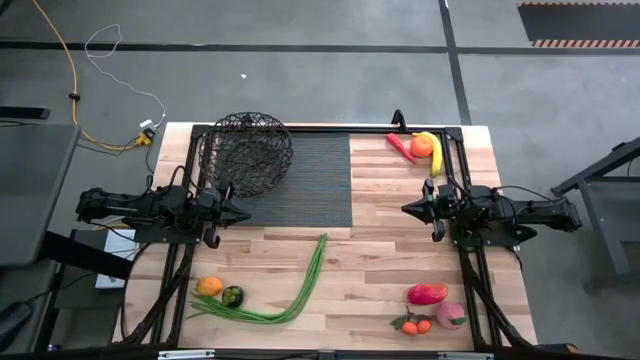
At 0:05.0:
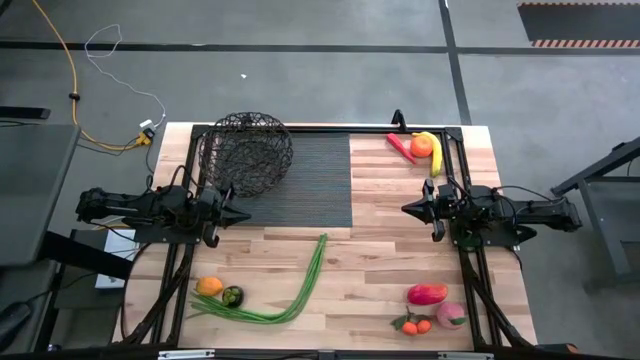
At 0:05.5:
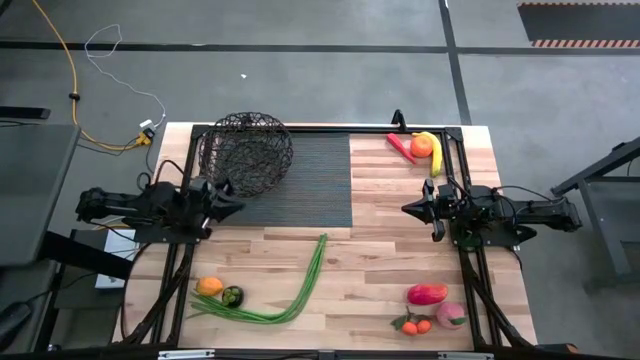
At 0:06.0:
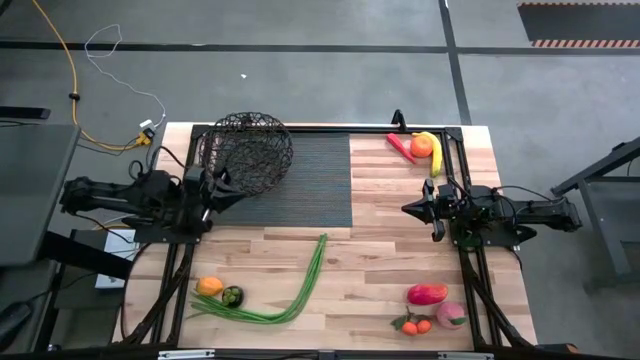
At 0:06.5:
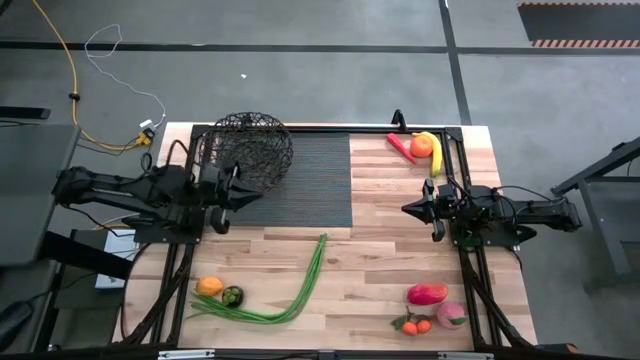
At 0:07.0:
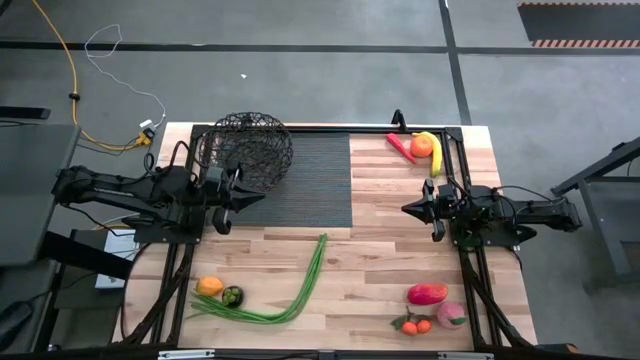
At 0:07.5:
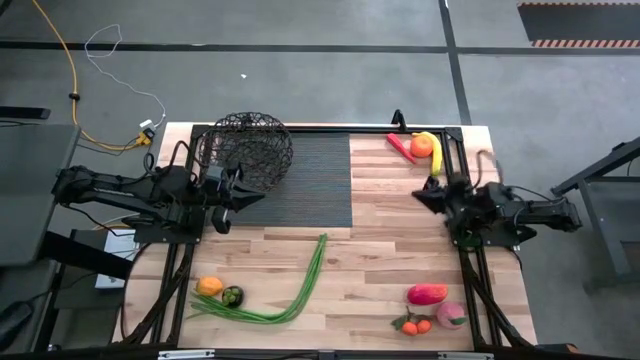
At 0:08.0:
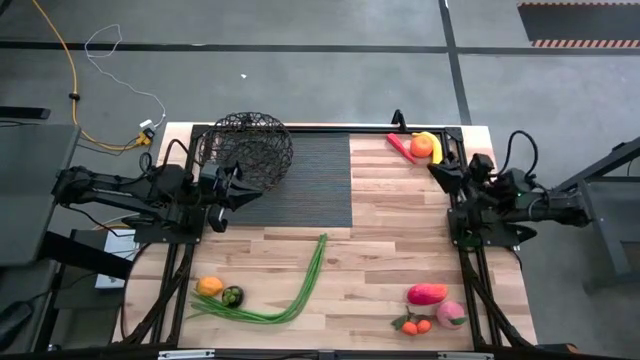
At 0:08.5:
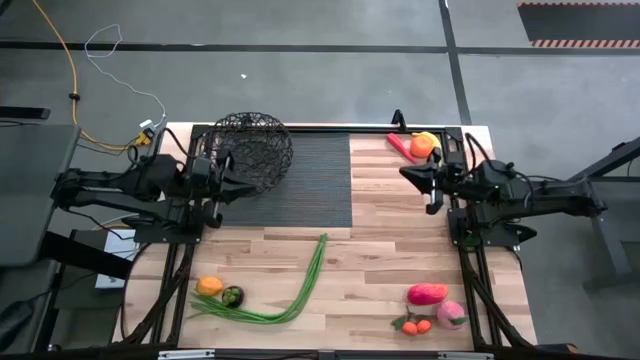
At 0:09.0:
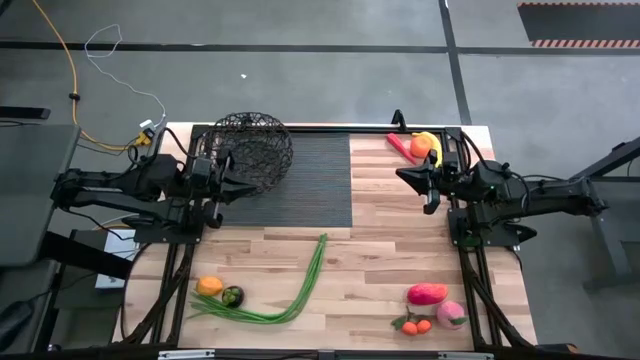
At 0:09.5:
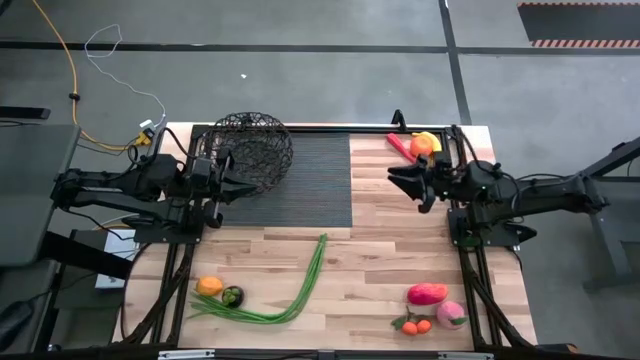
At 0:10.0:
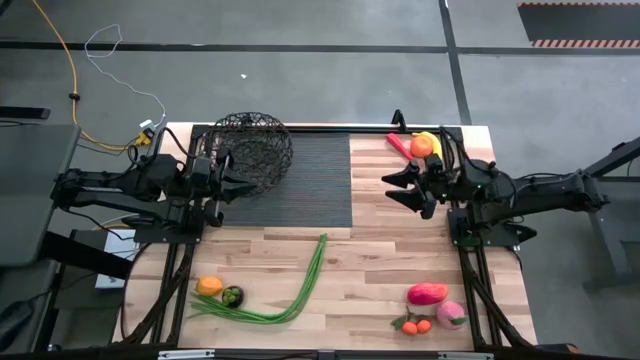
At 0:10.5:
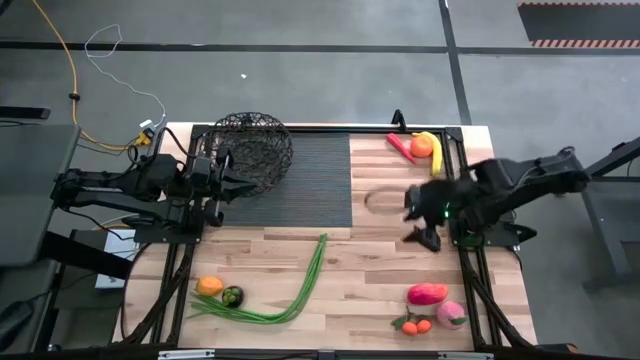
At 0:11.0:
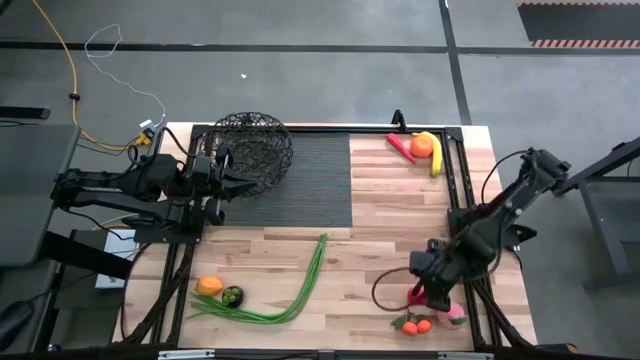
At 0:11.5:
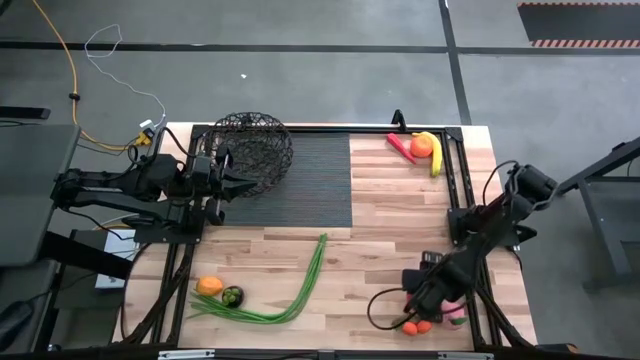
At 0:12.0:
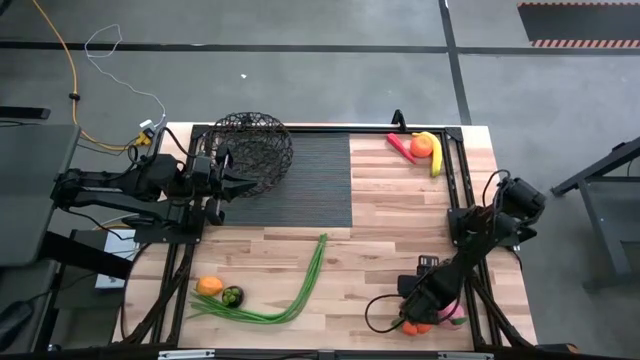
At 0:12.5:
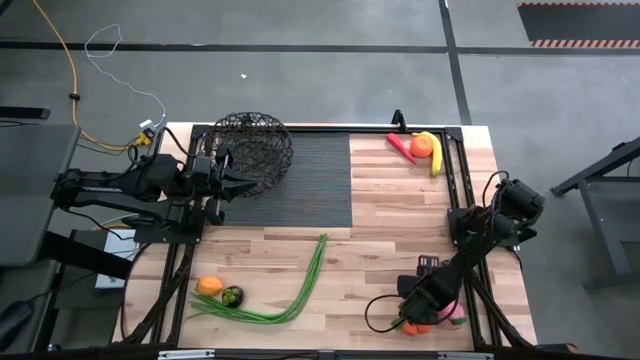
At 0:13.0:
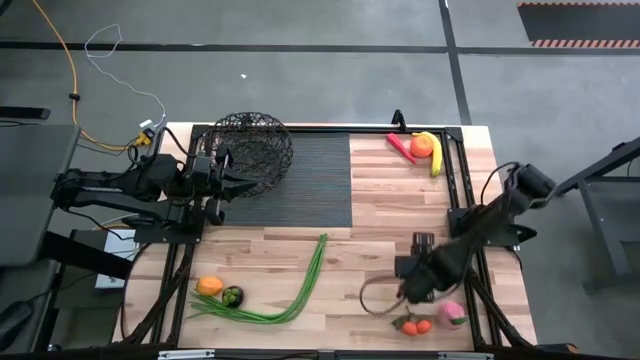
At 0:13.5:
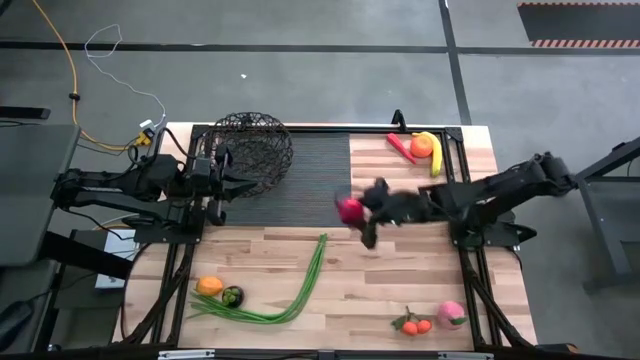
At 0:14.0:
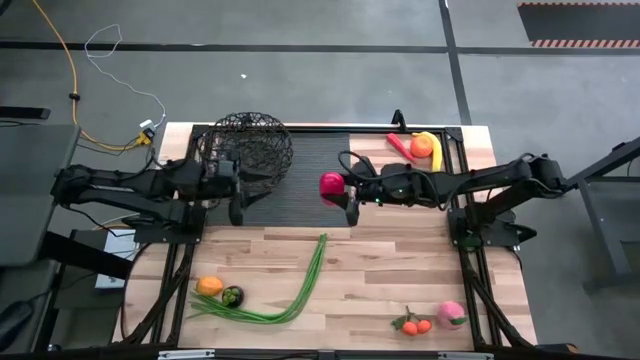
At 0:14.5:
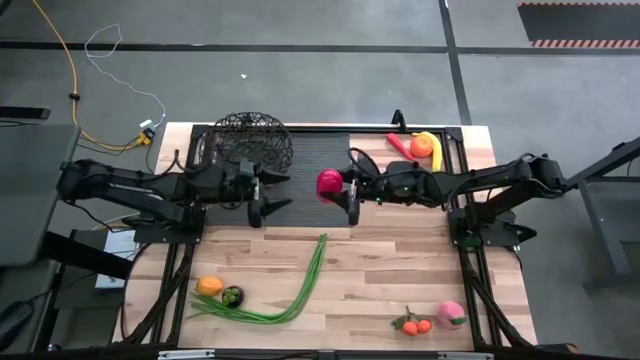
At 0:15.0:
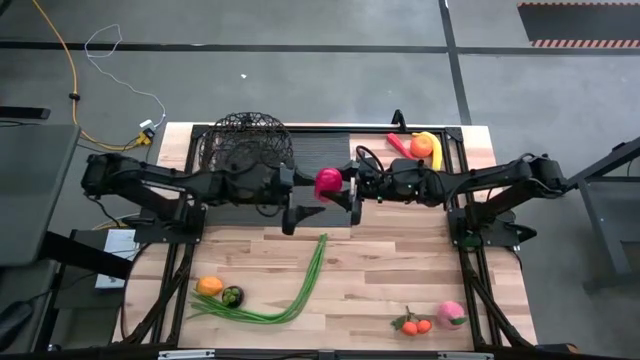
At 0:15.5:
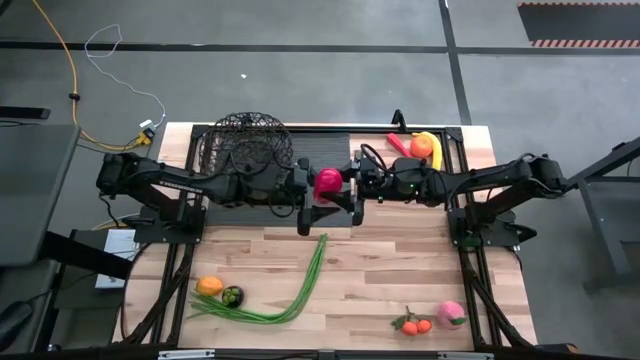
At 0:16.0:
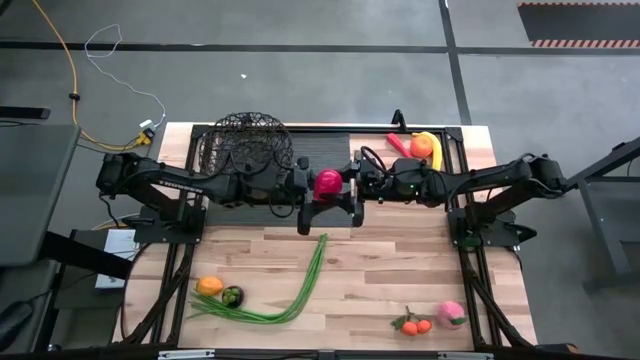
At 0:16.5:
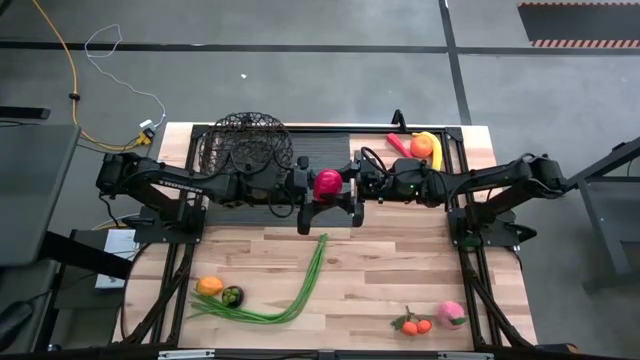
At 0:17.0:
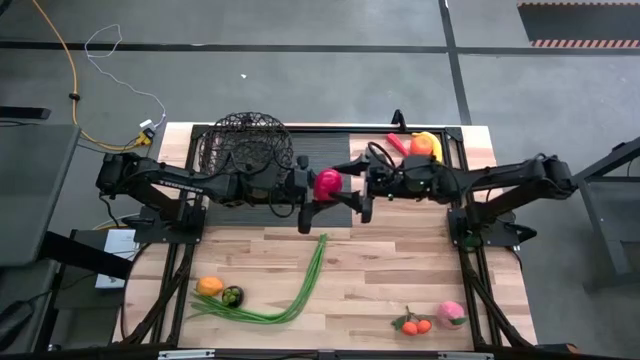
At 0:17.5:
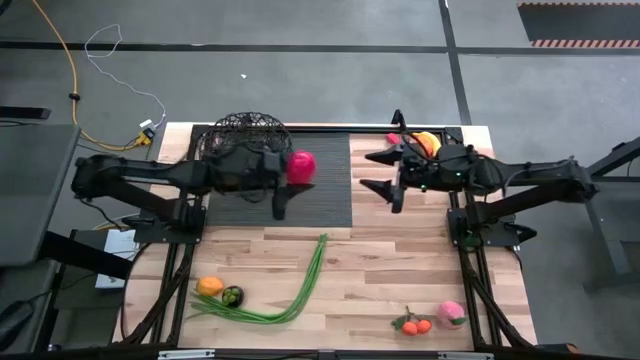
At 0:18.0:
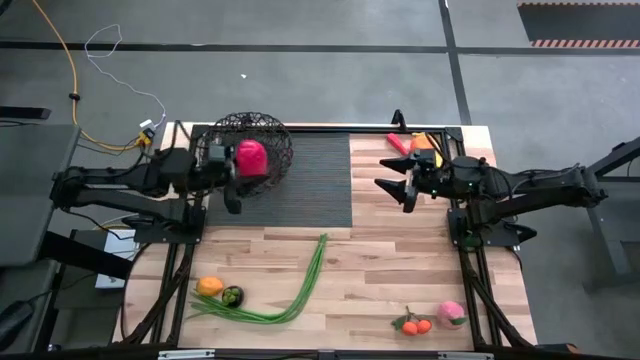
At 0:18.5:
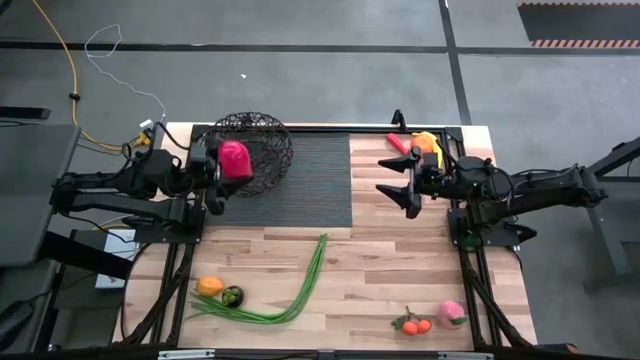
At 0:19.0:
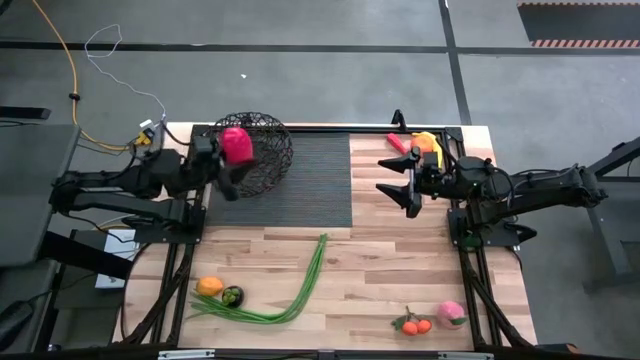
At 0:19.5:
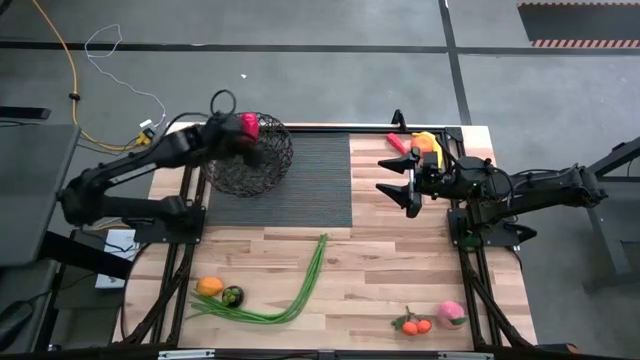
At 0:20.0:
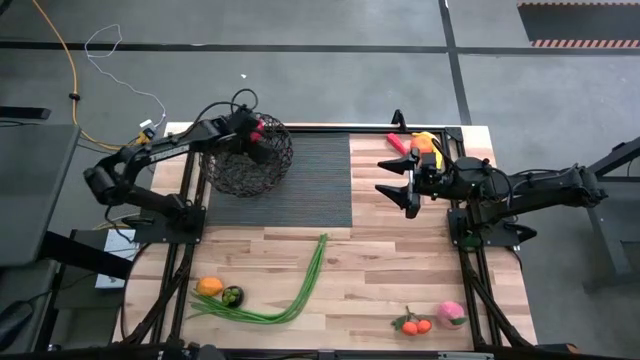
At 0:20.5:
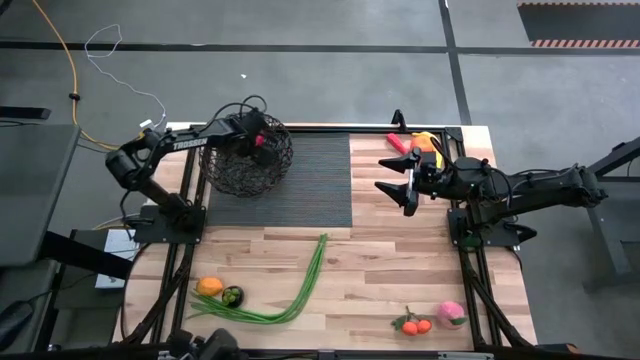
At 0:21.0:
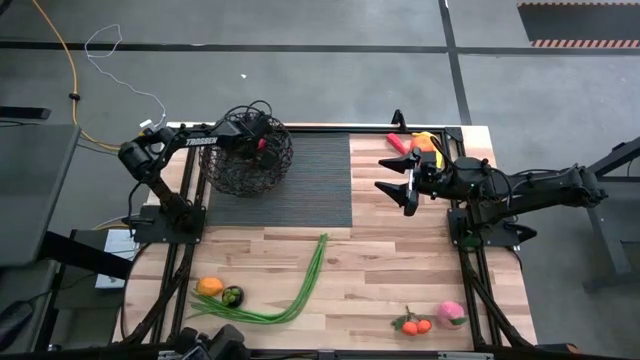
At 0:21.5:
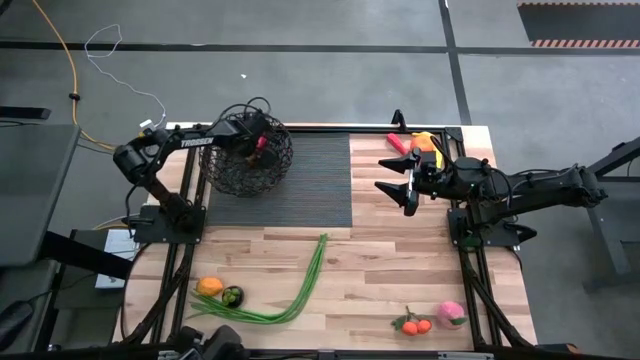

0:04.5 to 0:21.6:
Task: Build produce basket
Put the red mango into the black basket
